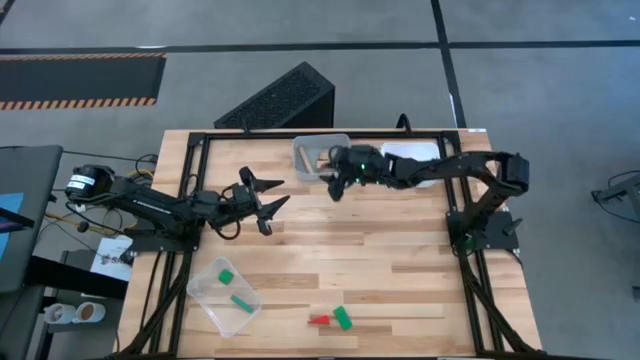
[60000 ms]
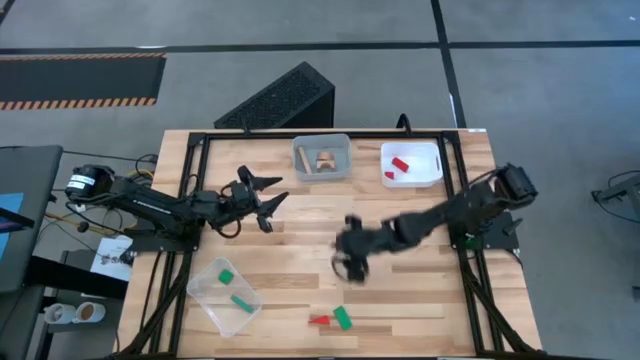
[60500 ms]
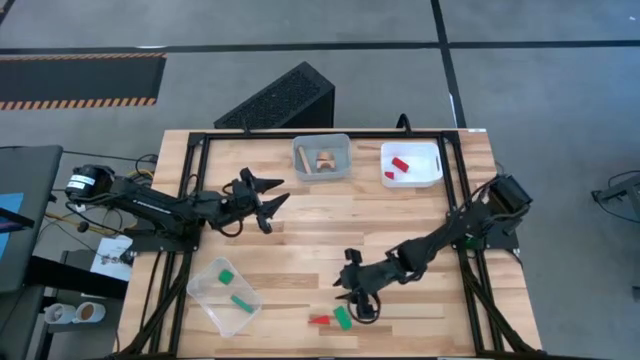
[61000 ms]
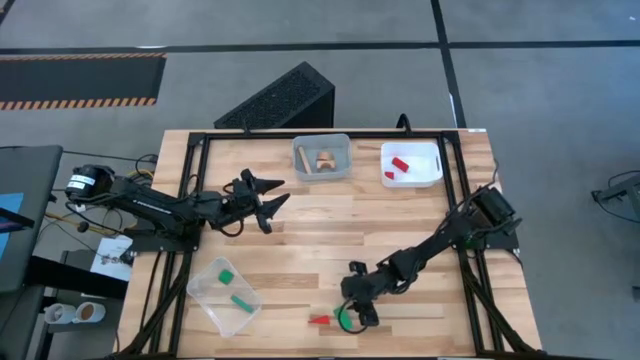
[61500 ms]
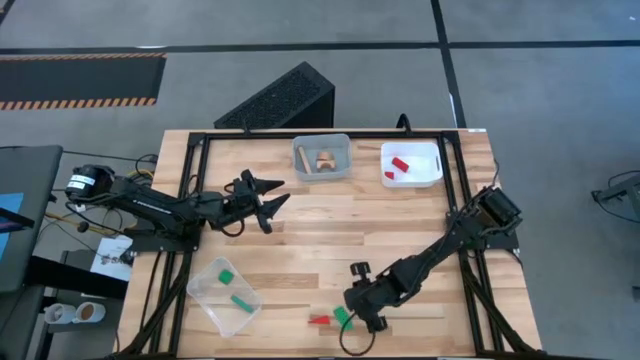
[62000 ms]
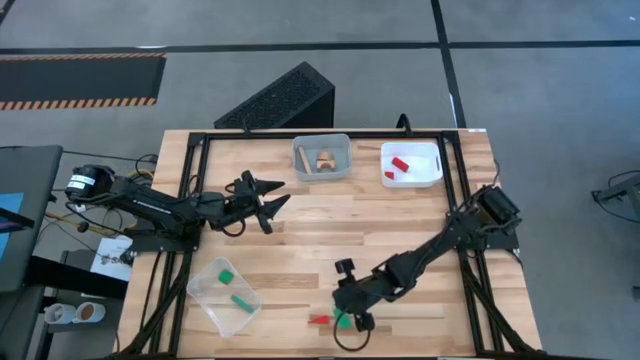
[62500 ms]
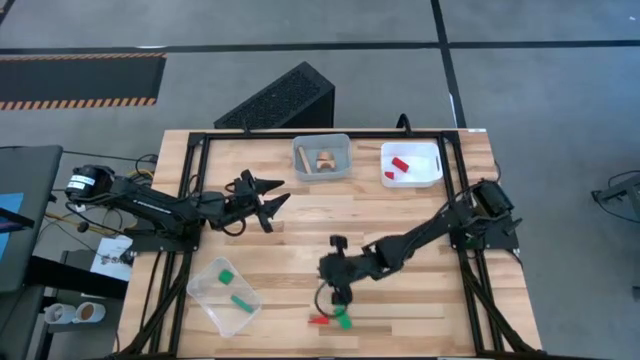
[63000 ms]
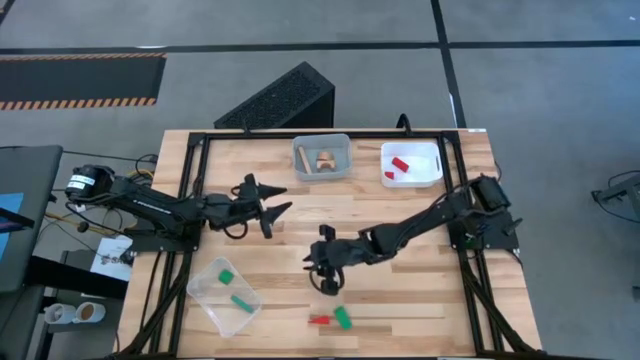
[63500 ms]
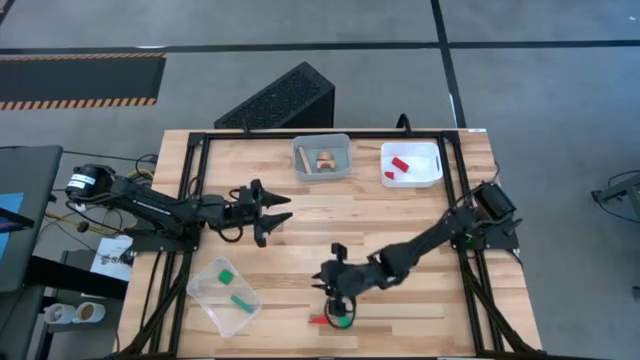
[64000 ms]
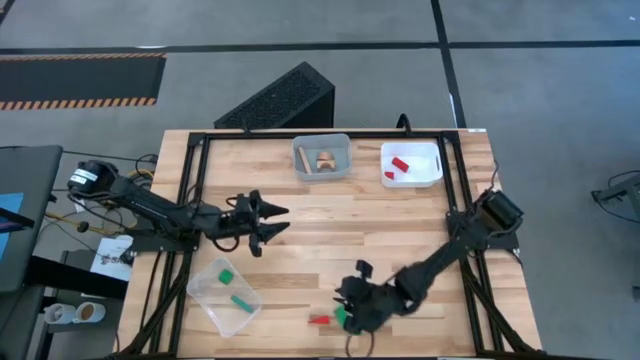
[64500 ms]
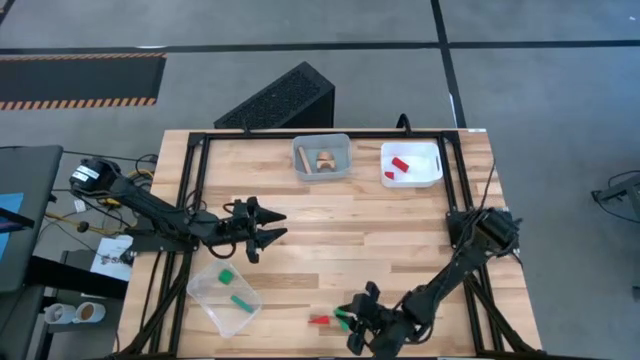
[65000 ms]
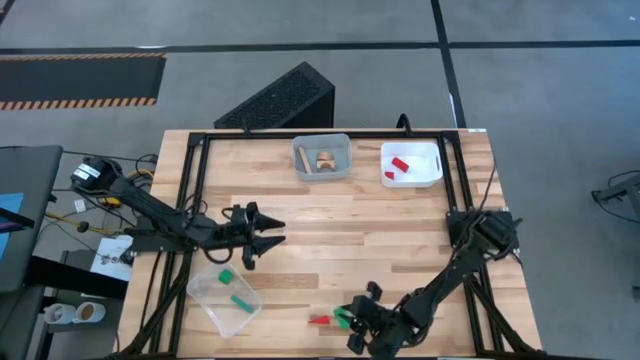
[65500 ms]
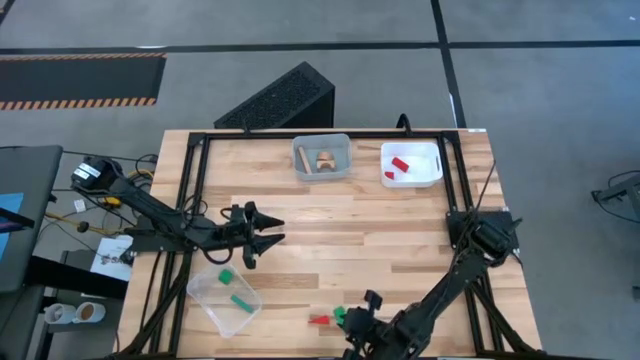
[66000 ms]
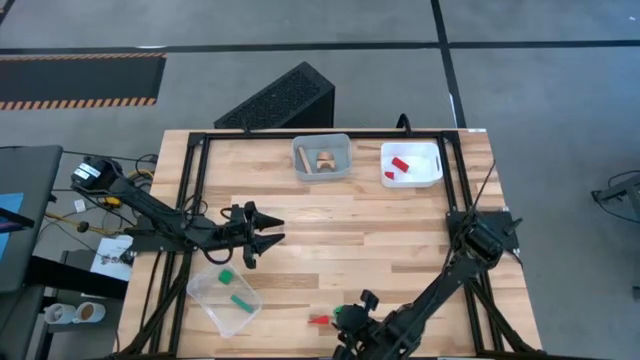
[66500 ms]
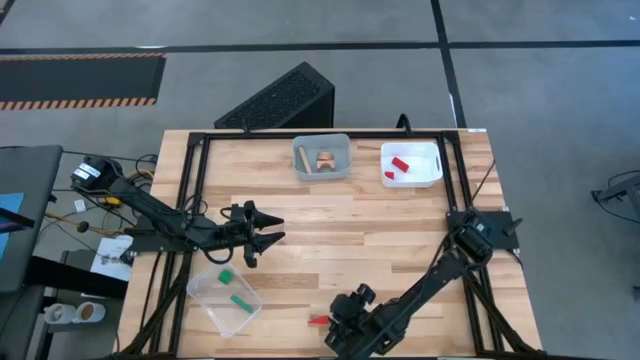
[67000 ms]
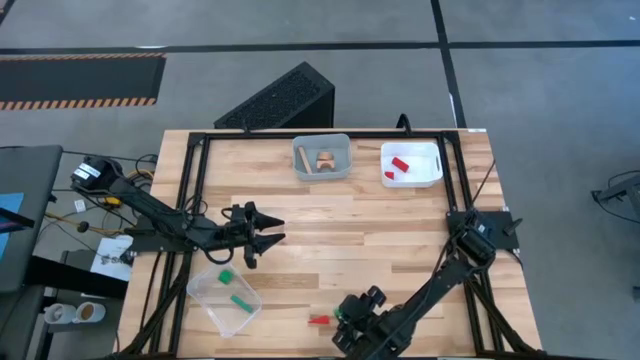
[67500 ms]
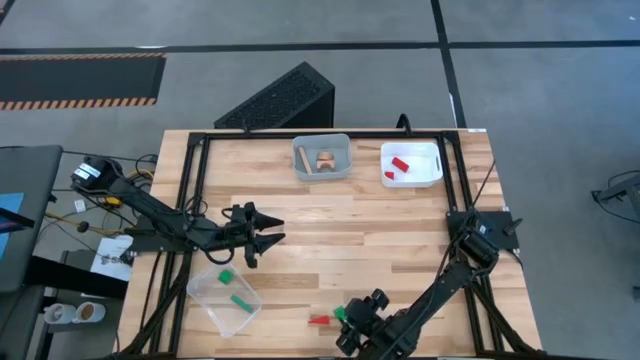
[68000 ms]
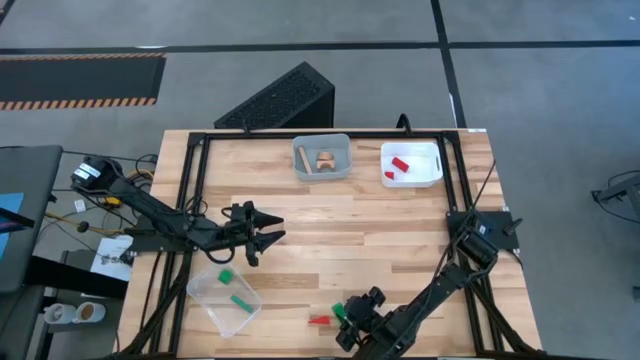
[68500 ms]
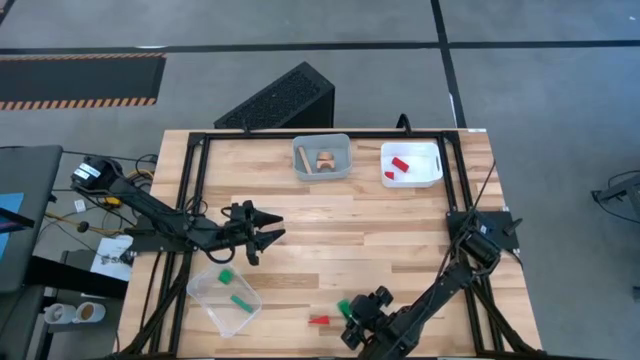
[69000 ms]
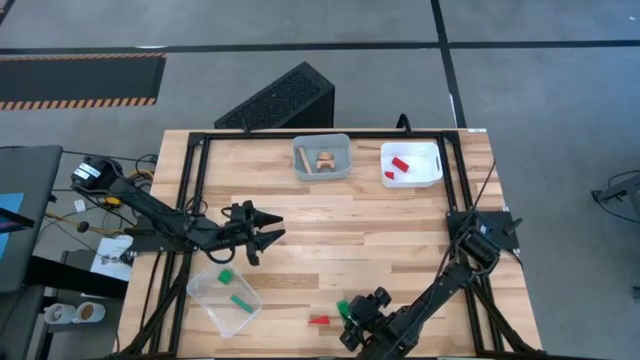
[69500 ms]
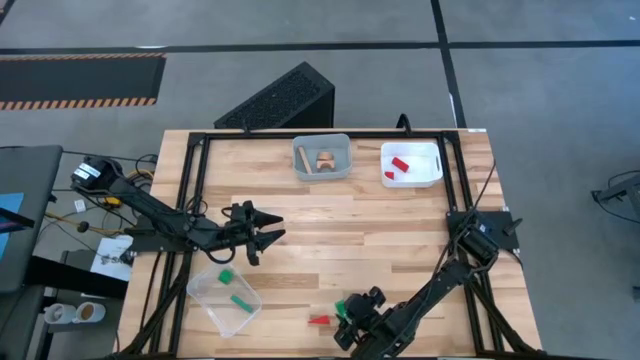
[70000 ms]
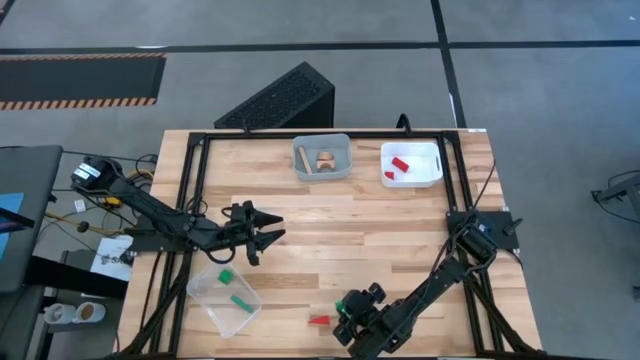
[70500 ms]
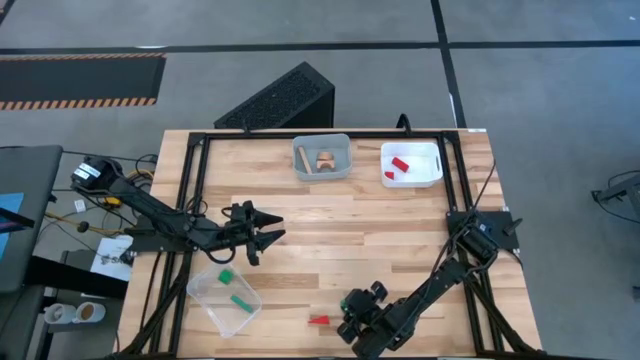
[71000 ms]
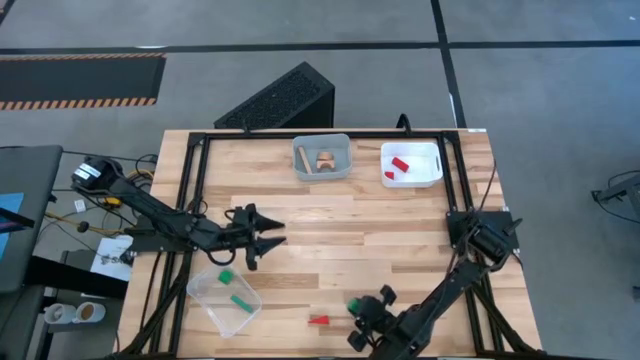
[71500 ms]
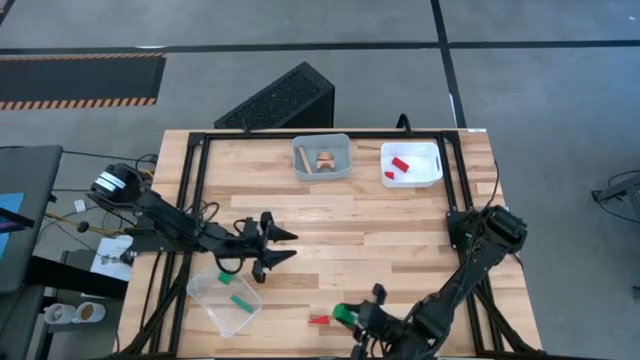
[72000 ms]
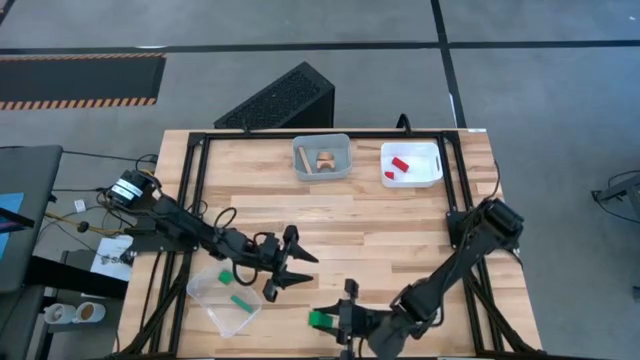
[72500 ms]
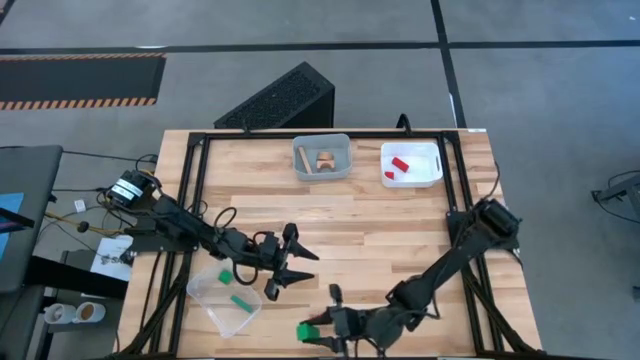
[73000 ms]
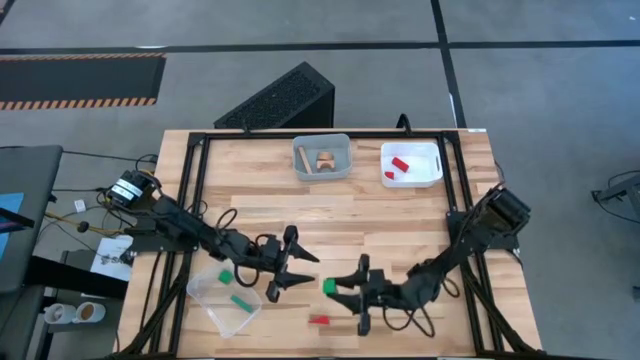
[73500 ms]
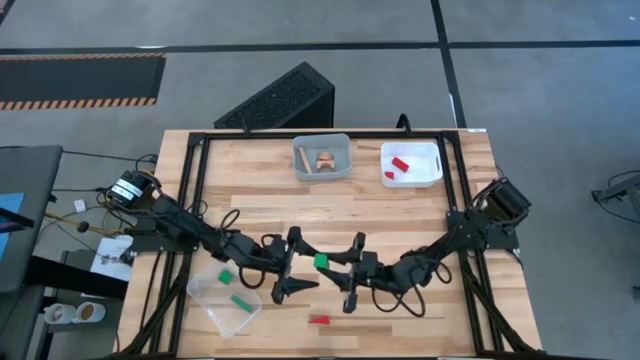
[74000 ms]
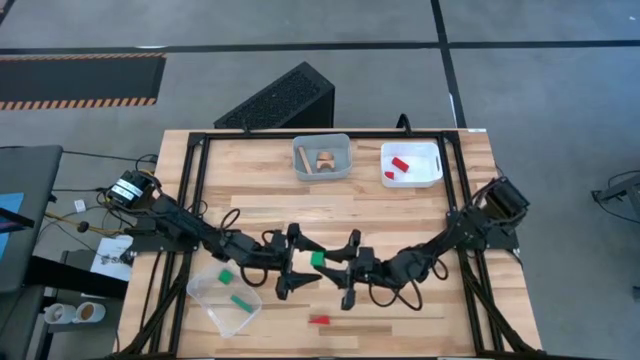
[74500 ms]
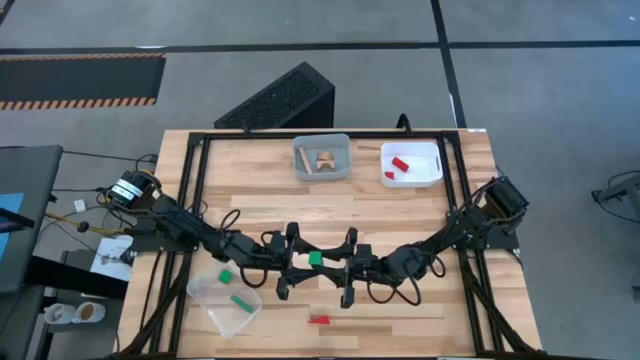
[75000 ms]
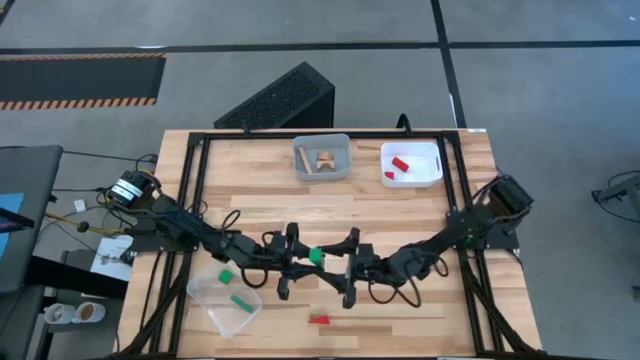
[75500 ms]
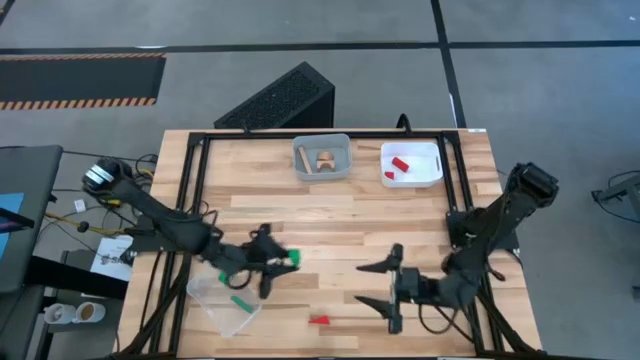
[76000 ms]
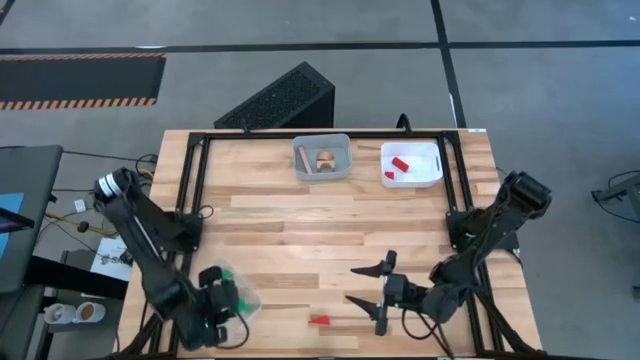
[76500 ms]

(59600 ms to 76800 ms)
Task: Sort & place blocks by color
Put the green block into the transparent bin

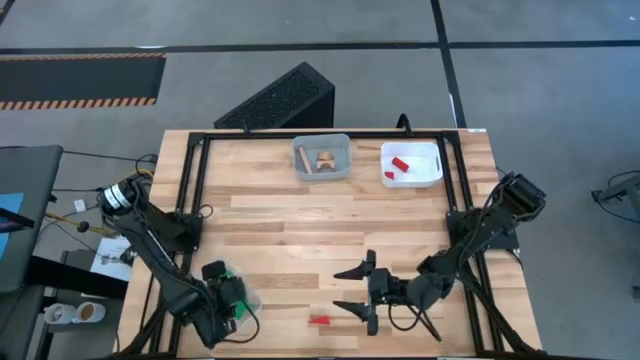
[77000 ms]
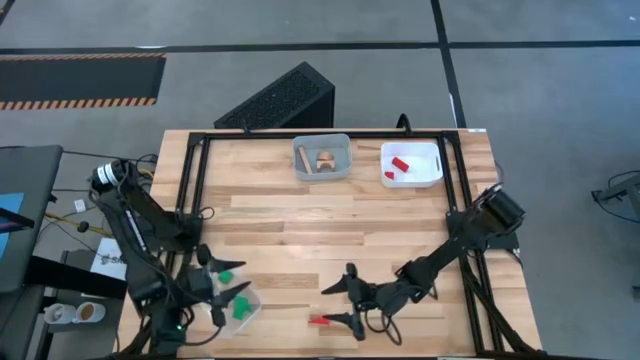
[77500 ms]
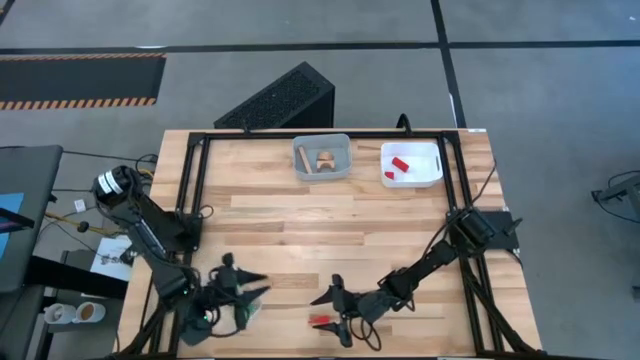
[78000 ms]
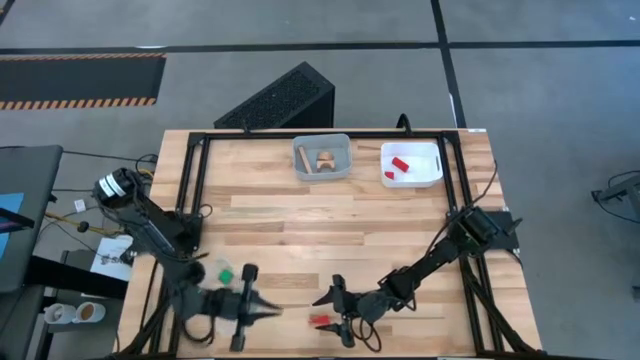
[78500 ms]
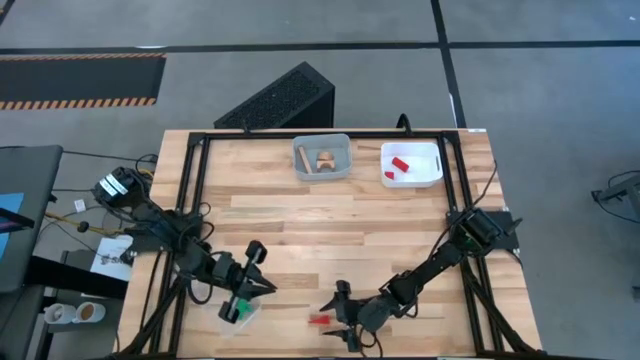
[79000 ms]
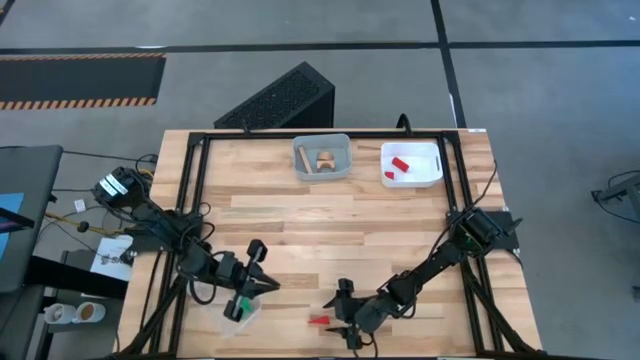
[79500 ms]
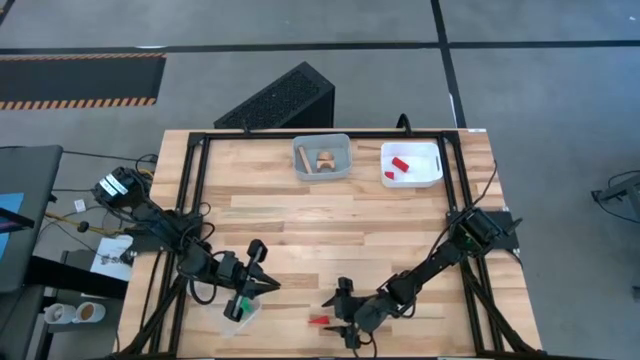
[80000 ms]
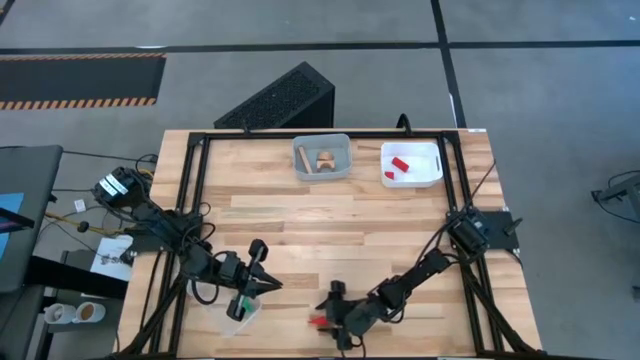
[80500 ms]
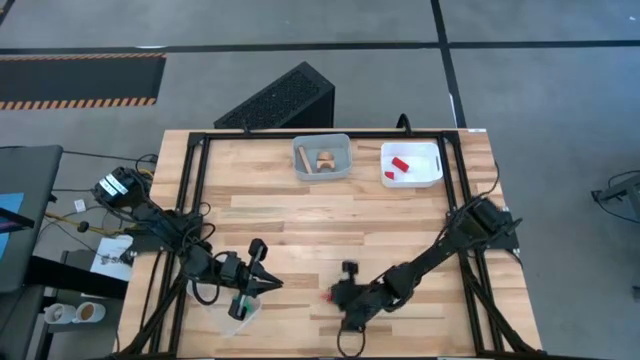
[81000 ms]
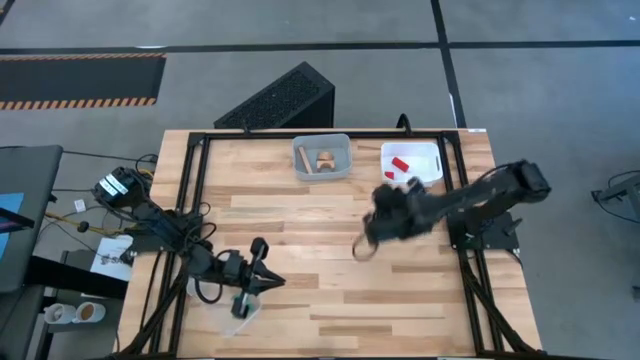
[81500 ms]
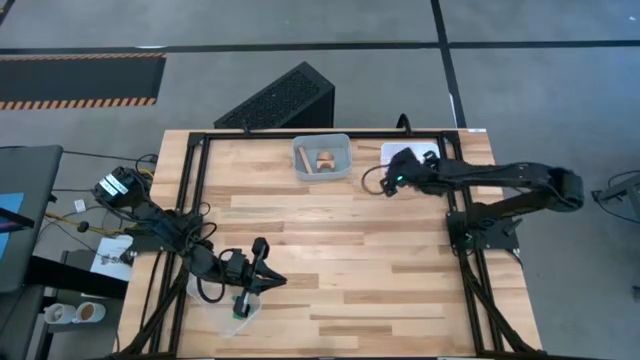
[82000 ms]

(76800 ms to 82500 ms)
Put the red block into the white bin
